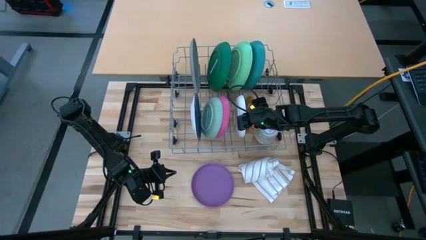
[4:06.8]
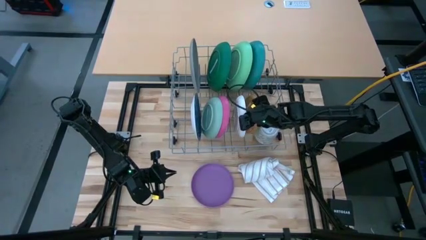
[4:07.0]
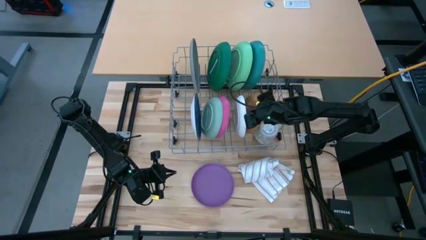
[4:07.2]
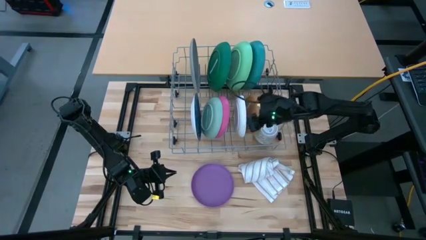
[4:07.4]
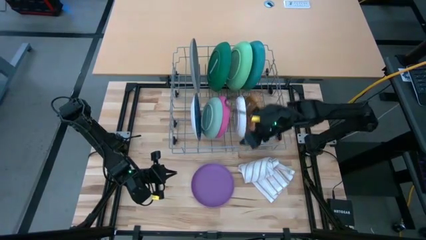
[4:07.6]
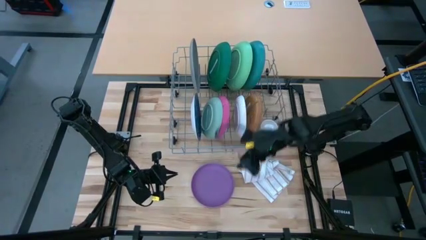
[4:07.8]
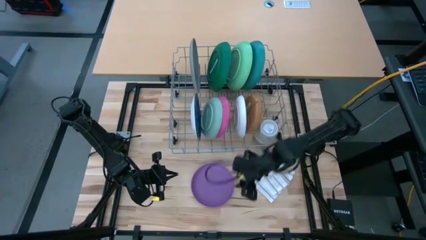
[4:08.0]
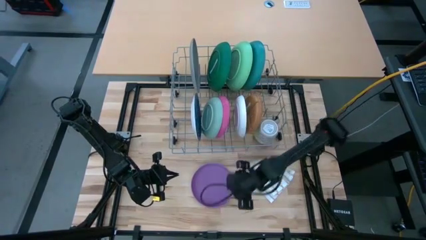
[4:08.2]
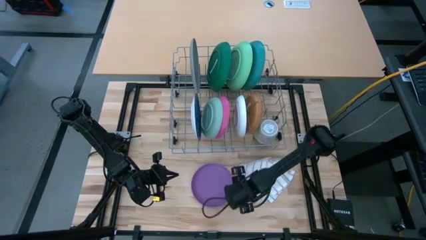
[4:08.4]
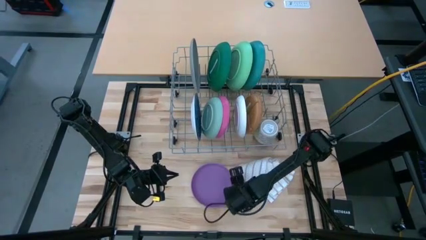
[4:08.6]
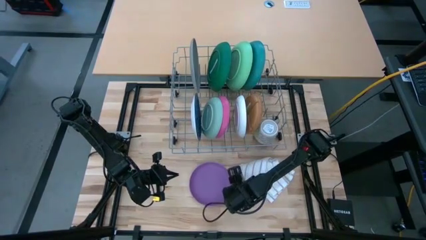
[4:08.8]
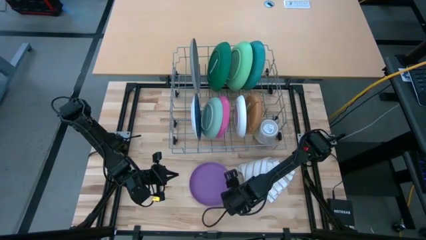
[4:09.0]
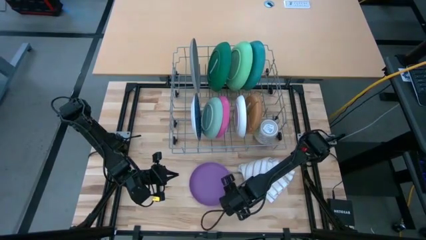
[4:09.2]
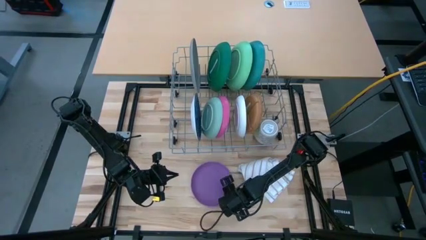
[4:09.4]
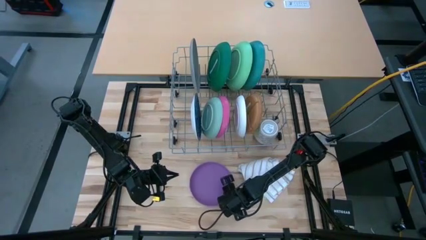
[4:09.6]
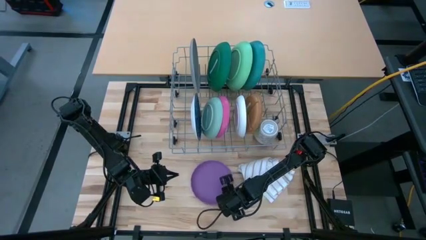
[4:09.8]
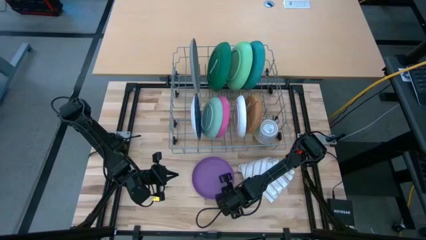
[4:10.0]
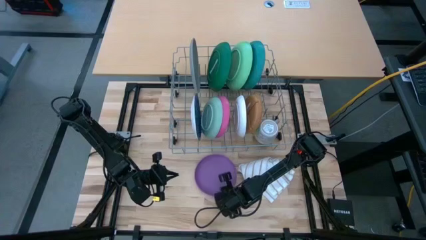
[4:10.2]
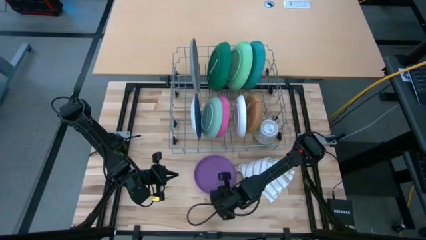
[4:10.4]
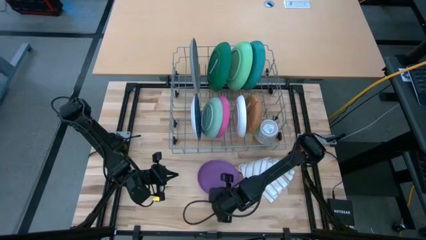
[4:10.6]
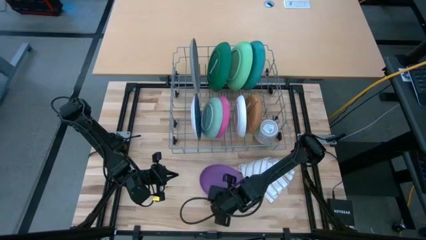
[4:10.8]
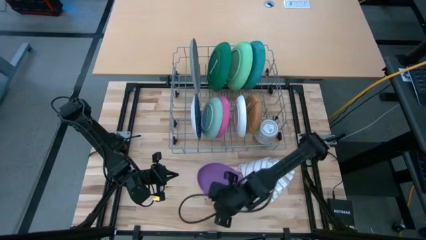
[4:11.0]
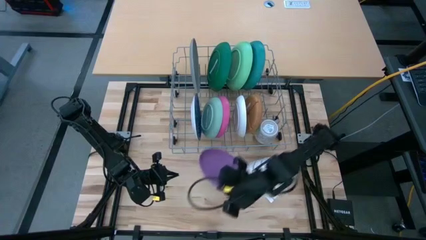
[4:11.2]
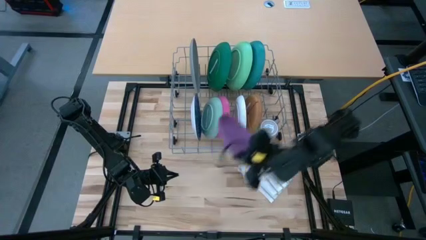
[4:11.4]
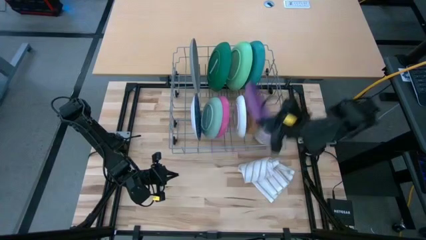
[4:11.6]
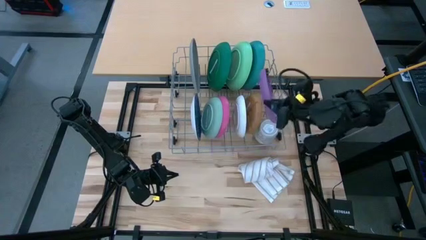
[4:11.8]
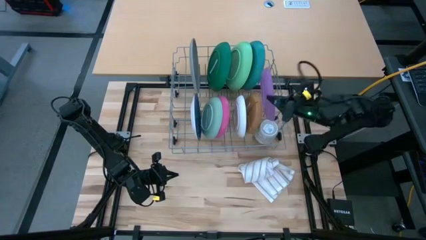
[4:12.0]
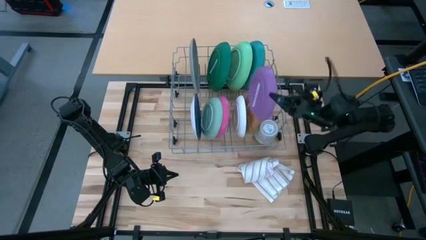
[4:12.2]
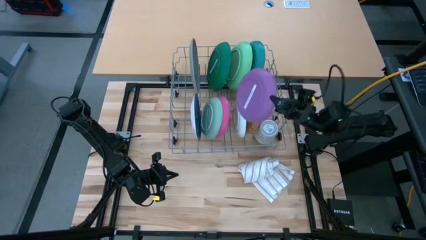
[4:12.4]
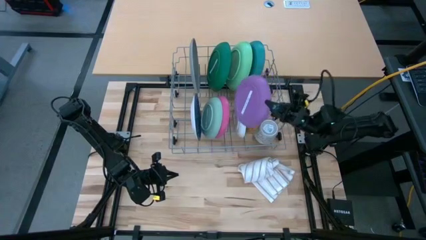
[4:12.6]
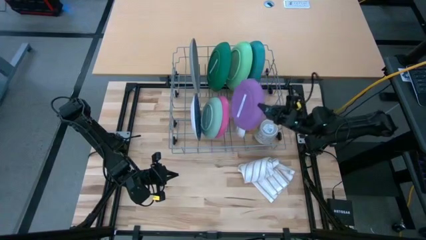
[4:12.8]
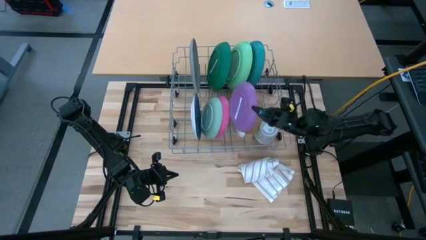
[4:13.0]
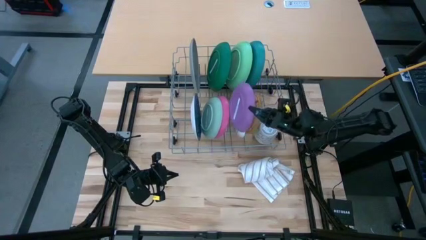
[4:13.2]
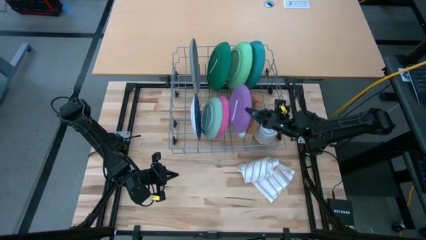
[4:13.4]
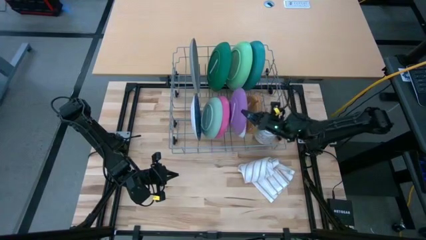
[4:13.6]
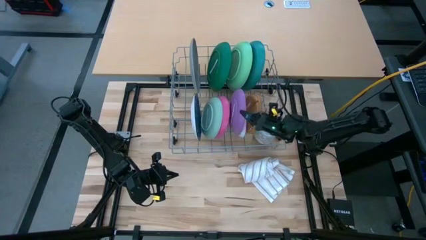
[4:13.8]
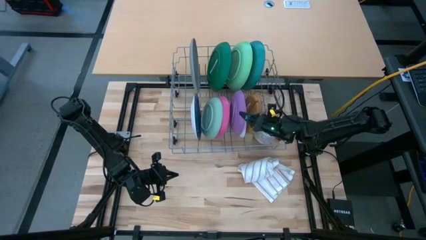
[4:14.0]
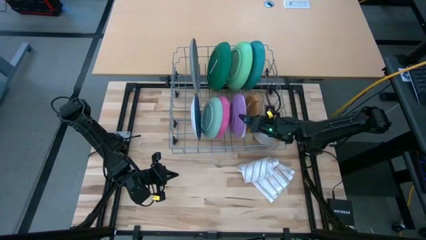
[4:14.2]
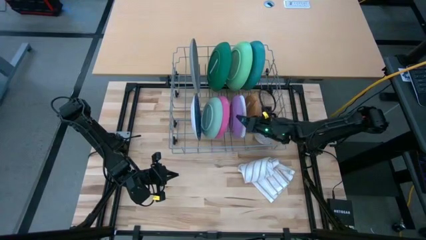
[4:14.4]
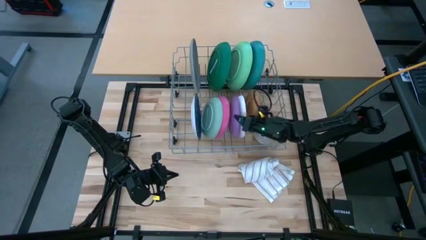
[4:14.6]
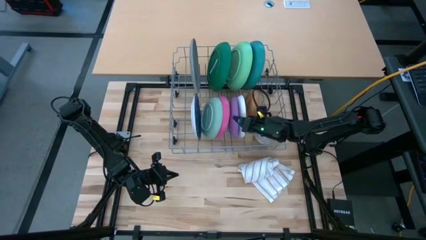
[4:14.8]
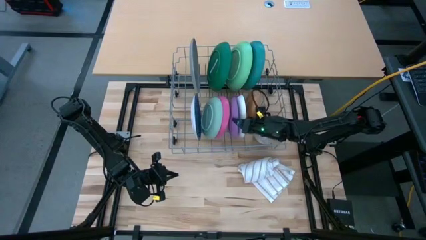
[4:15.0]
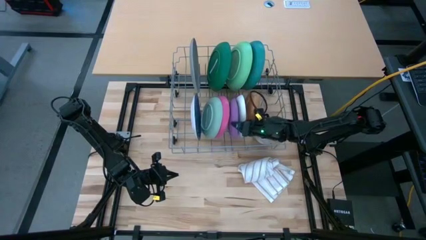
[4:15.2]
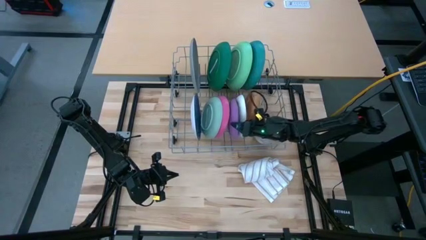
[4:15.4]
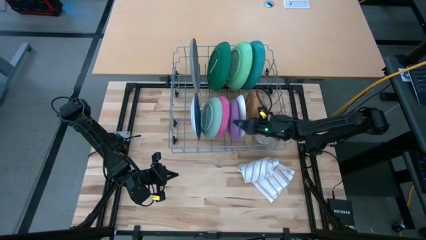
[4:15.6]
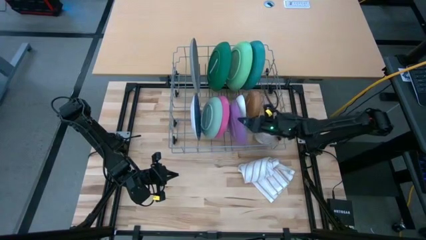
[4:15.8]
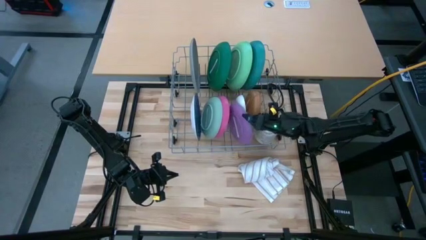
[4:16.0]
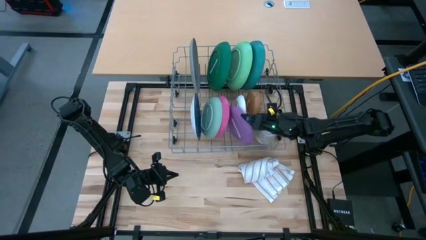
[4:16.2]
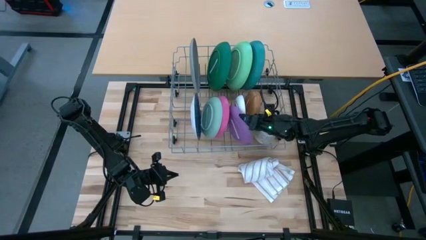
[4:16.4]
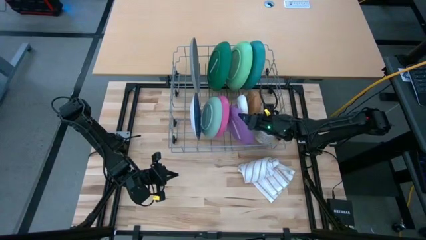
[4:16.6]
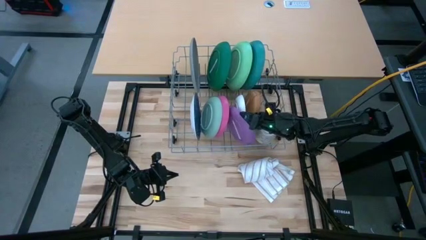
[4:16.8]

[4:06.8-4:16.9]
Task: Sort dishes
Put the violet plate in the dish rack

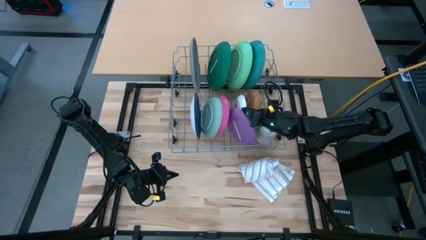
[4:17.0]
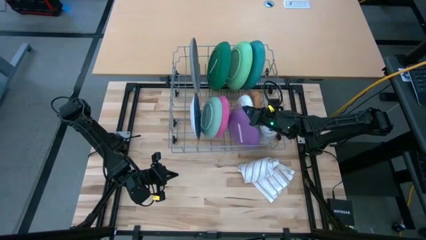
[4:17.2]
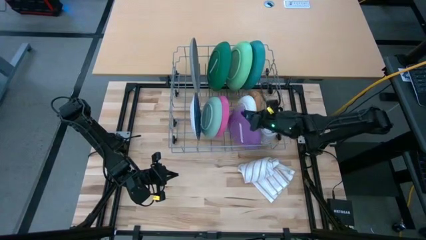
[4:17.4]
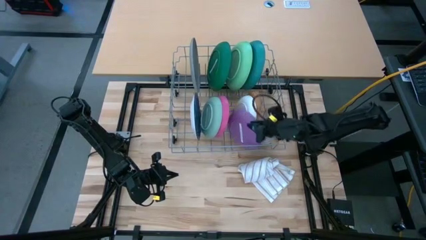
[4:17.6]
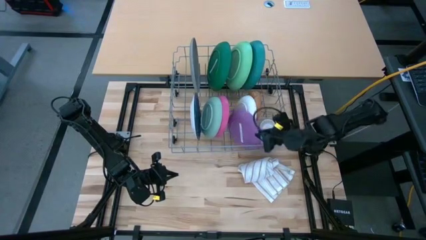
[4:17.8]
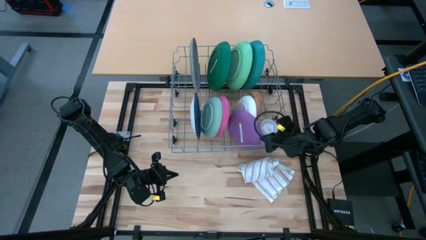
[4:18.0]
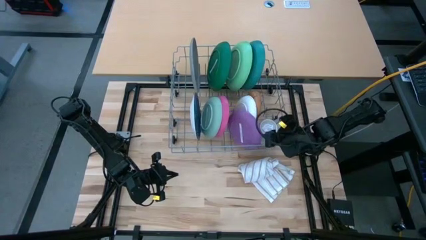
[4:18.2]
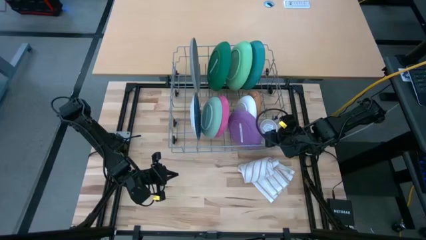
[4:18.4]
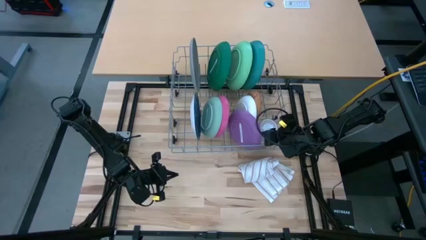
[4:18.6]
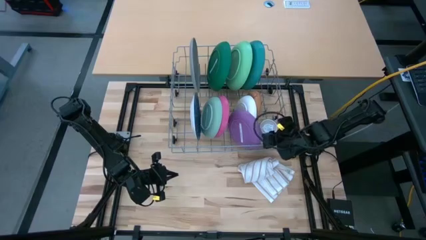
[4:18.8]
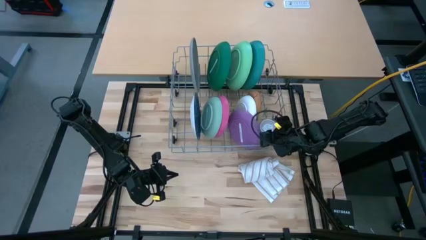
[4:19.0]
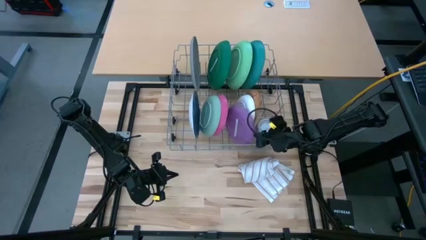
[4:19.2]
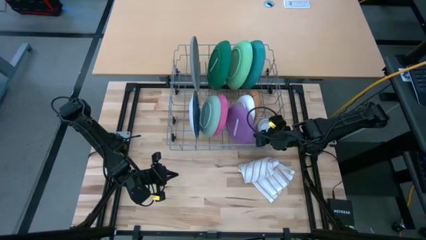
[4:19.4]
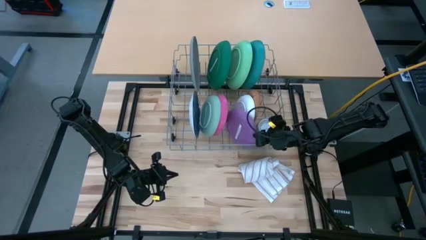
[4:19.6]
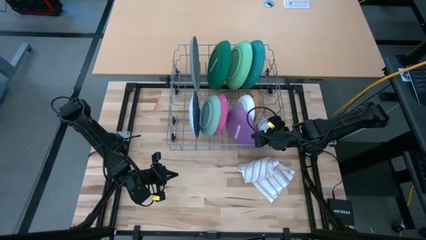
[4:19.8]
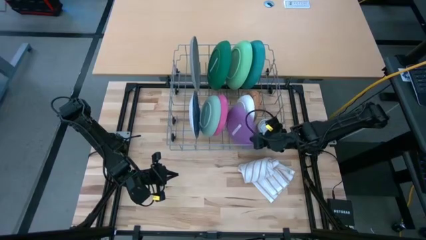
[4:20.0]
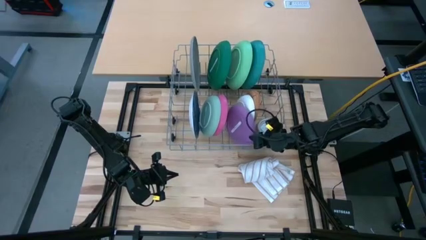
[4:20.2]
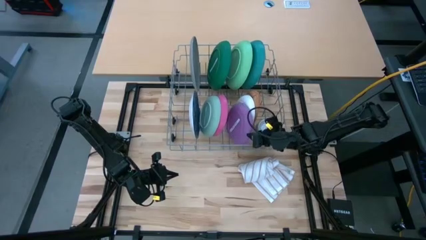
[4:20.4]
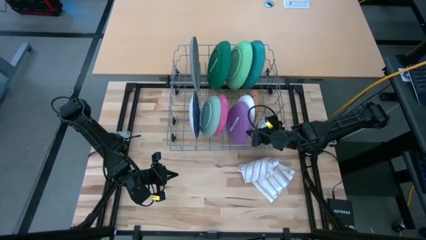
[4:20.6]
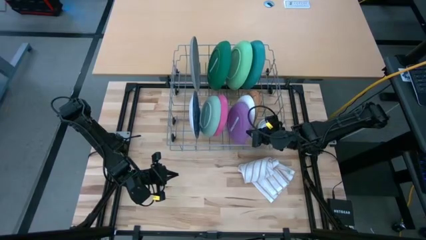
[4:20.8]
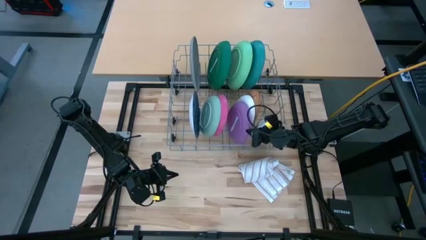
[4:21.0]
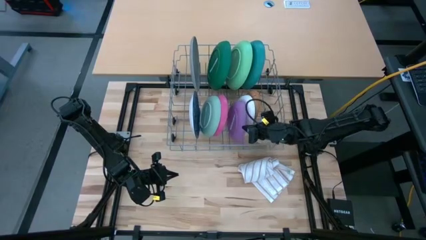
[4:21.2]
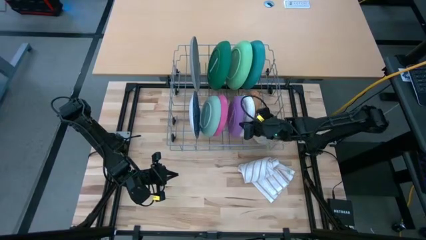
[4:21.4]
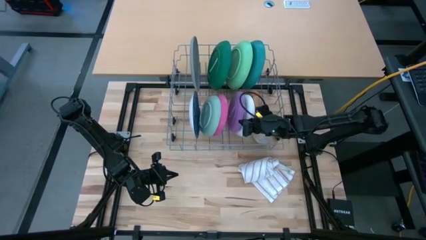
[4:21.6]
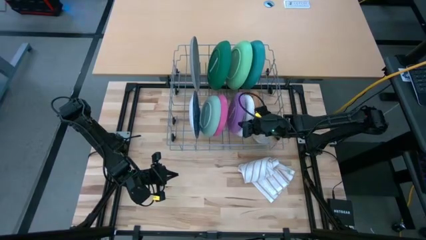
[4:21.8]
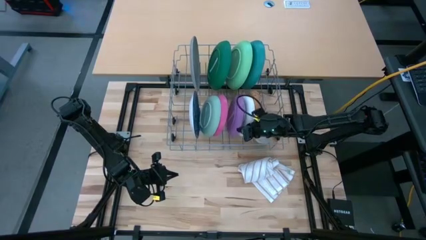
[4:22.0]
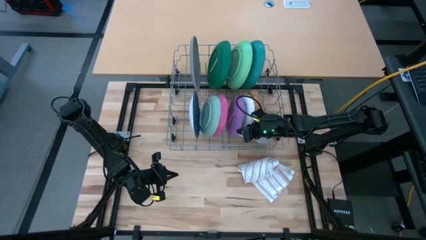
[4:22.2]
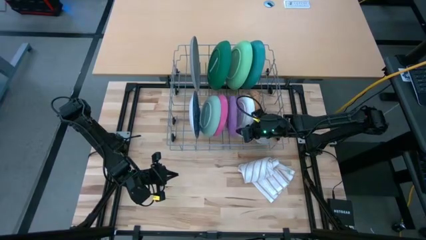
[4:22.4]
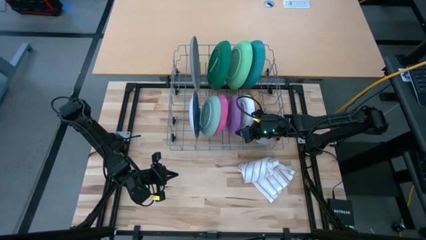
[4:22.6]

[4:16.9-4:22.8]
Put the violet plate in the dish rack
